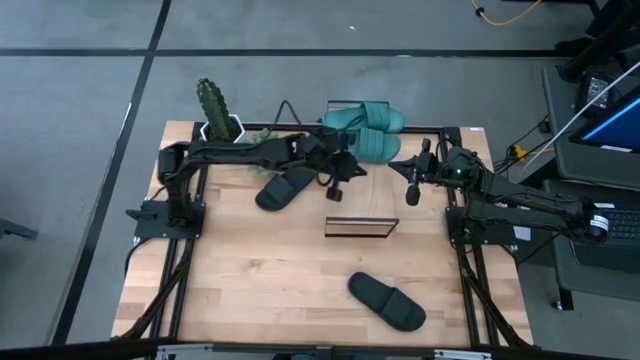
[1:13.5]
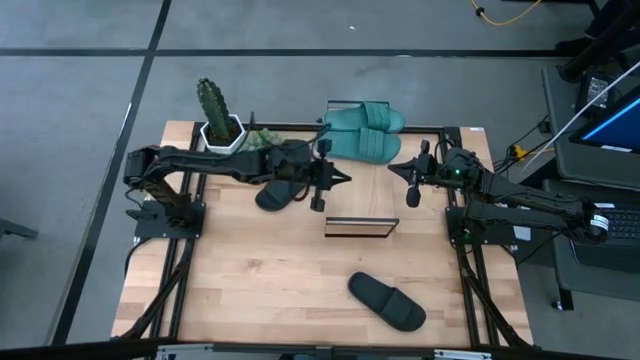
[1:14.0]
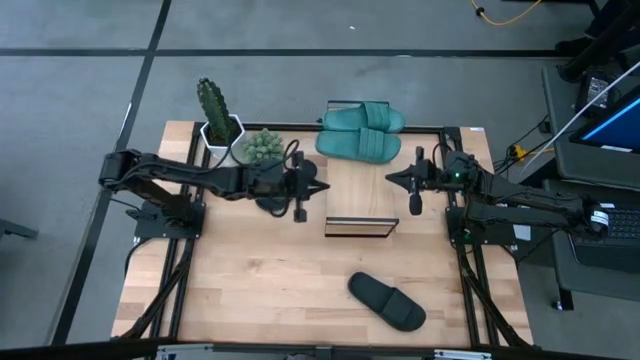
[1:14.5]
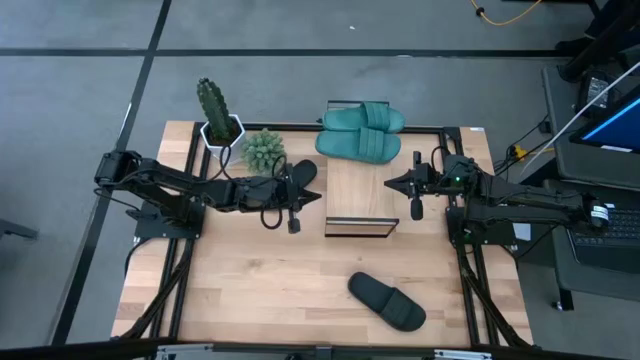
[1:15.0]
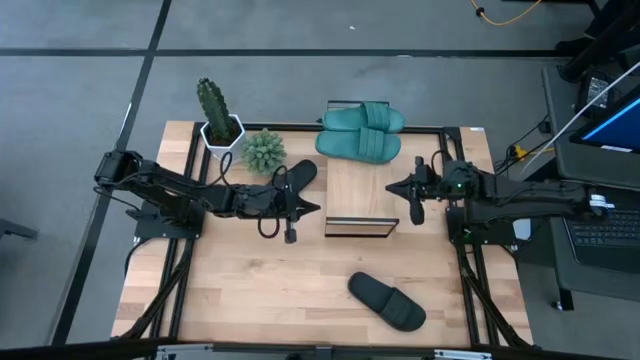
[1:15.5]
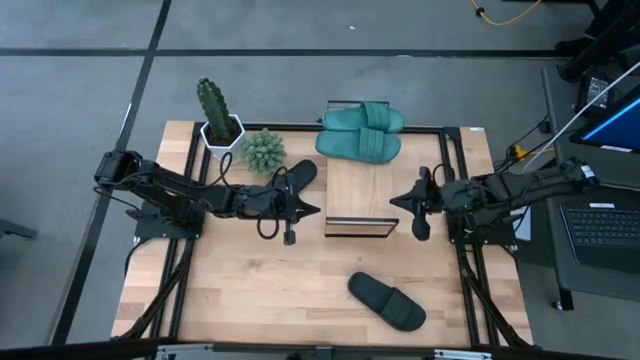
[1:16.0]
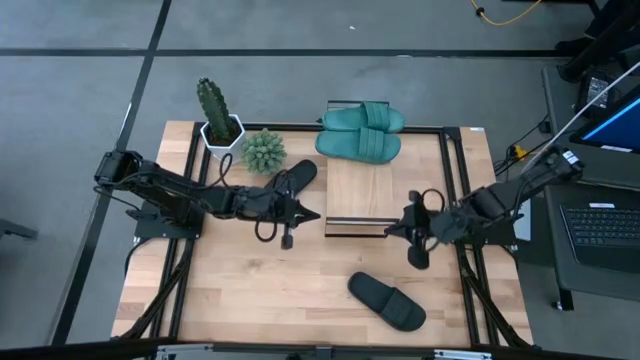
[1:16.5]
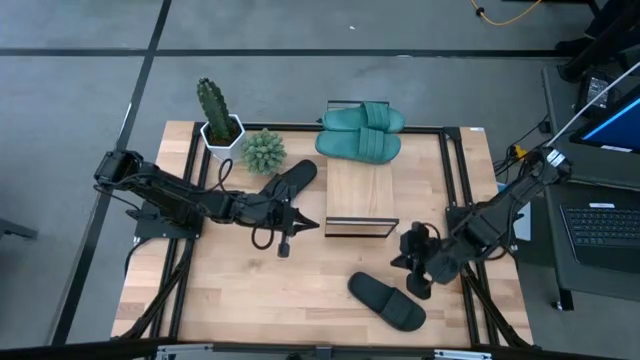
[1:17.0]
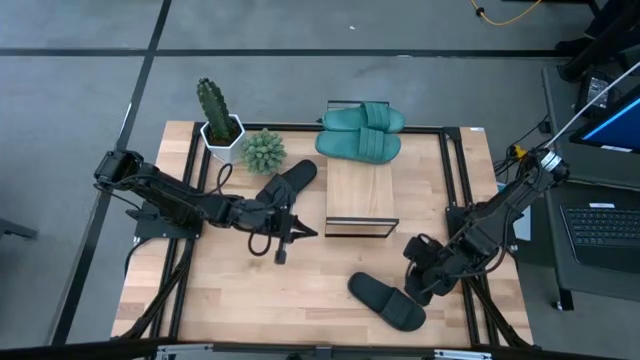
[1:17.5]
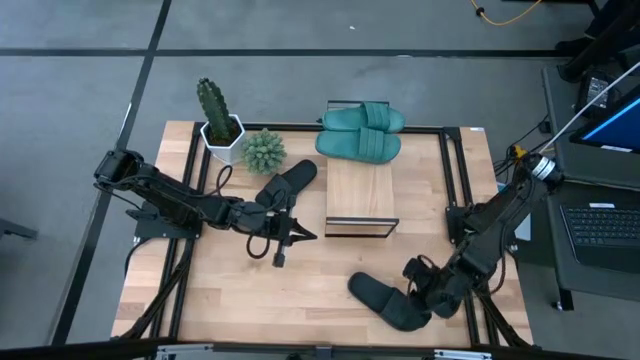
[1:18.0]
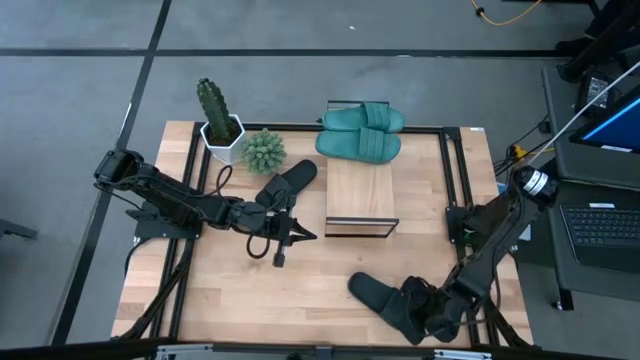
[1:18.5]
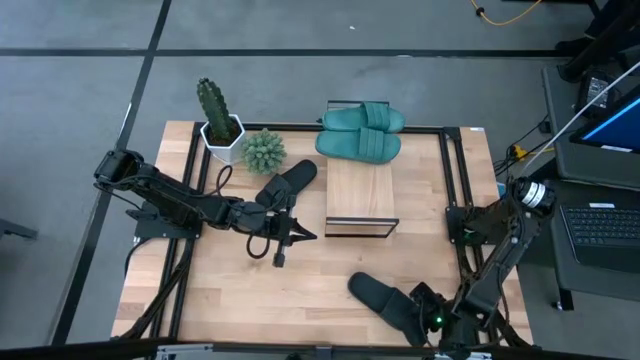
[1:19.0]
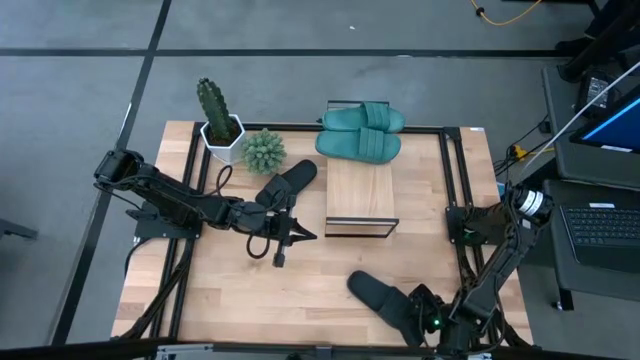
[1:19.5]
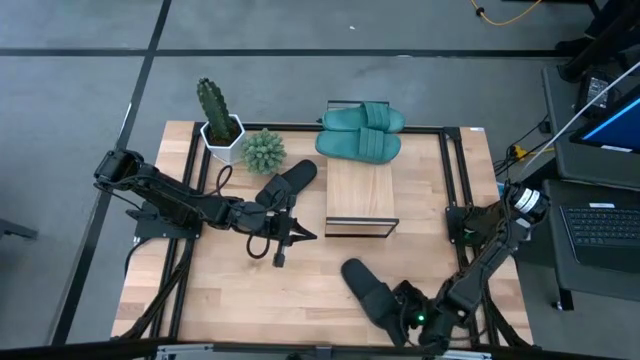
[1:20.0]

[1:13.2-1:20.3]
Task: Pick and place slides into the shelf
Put the bottom black slide on the shelf

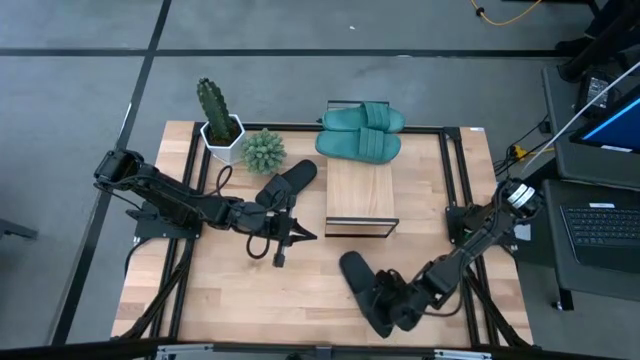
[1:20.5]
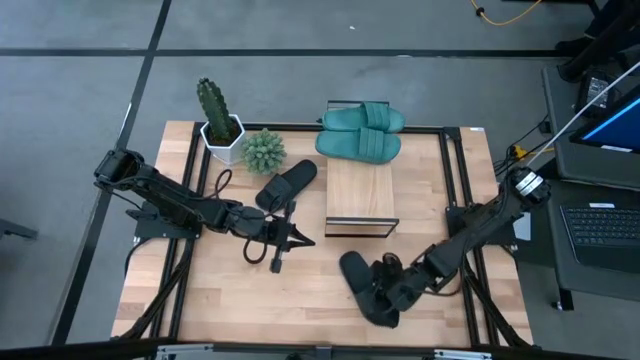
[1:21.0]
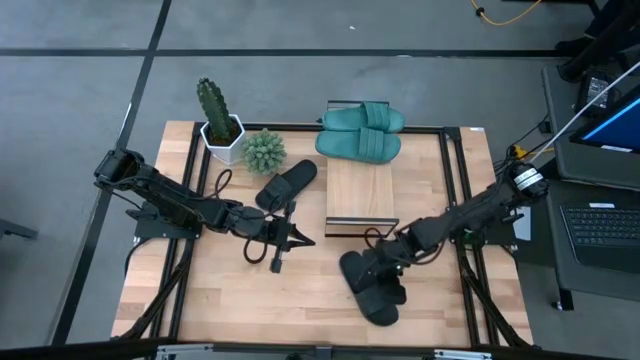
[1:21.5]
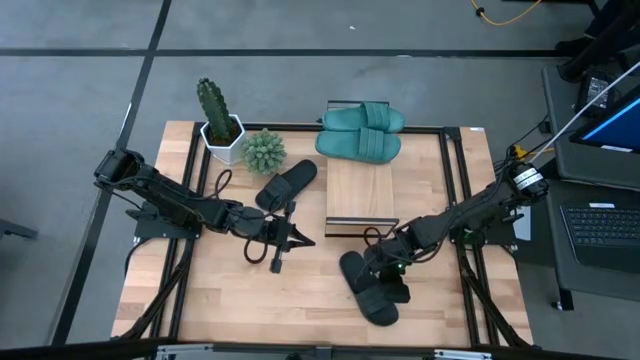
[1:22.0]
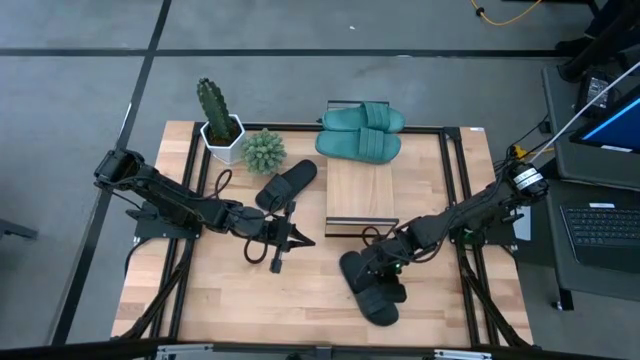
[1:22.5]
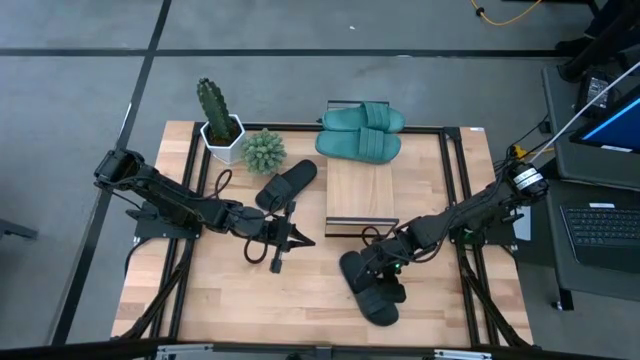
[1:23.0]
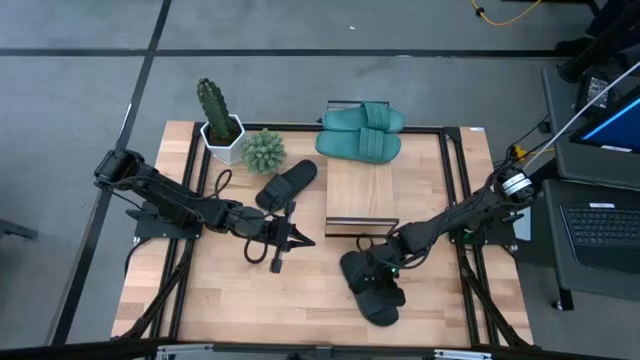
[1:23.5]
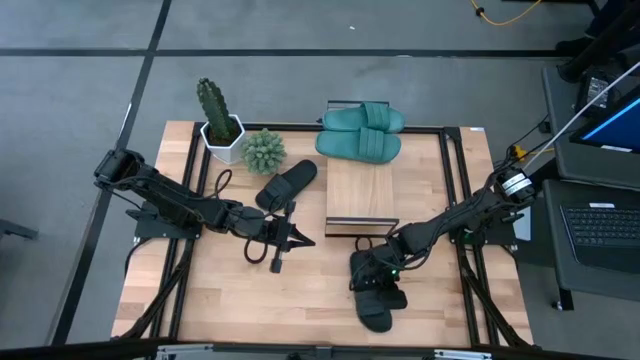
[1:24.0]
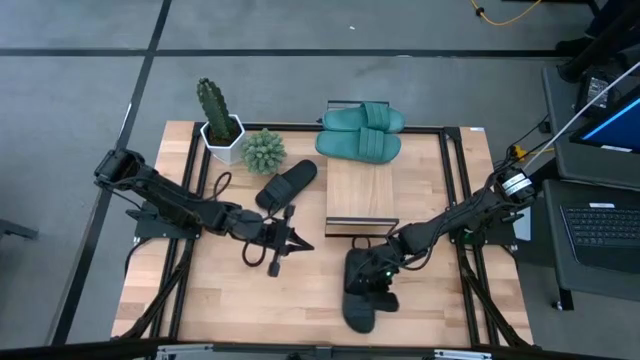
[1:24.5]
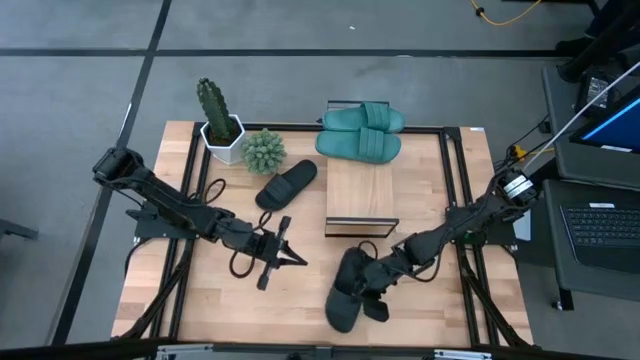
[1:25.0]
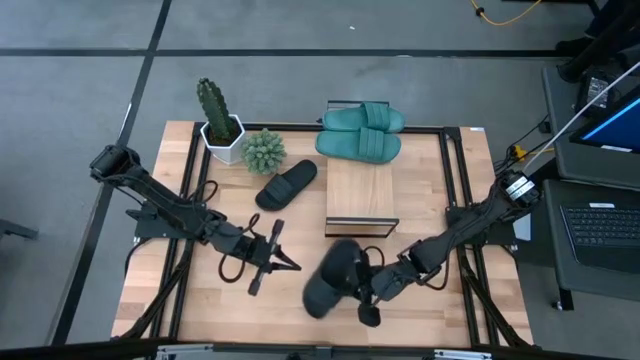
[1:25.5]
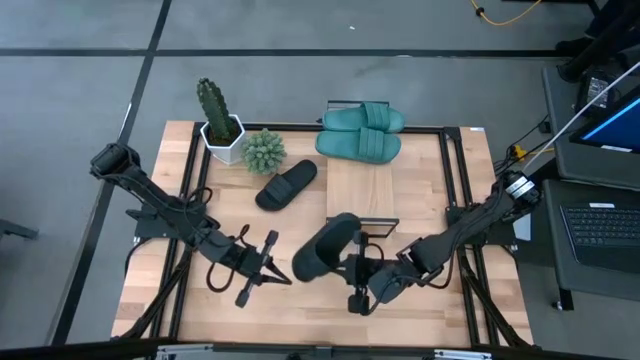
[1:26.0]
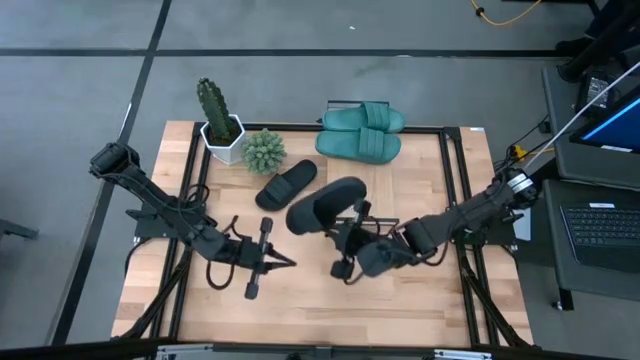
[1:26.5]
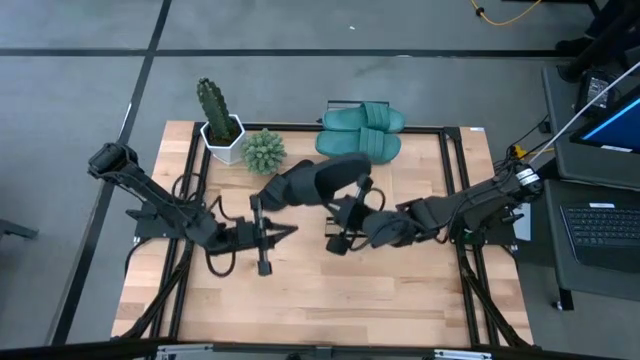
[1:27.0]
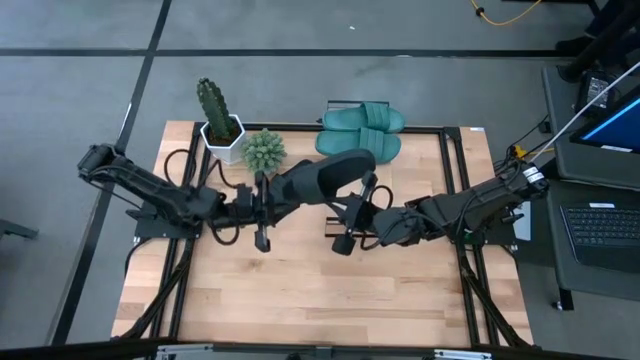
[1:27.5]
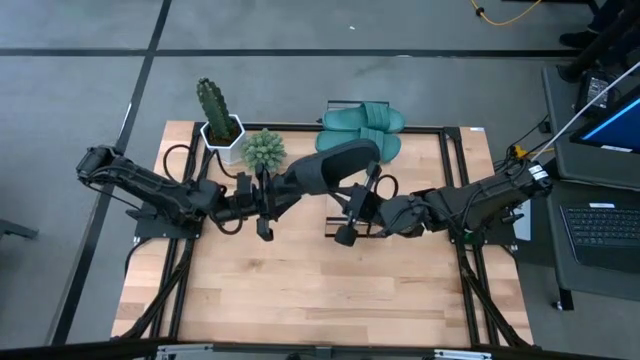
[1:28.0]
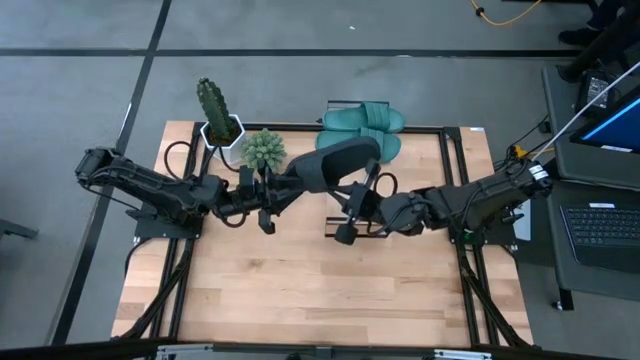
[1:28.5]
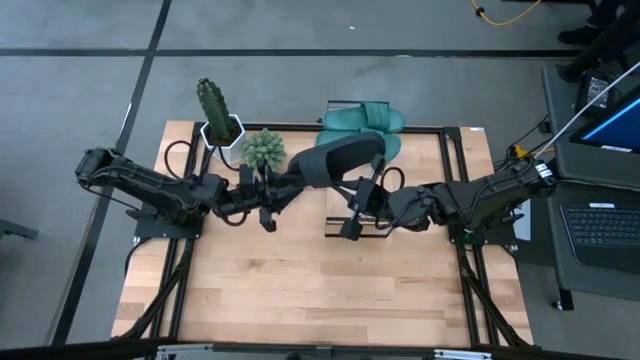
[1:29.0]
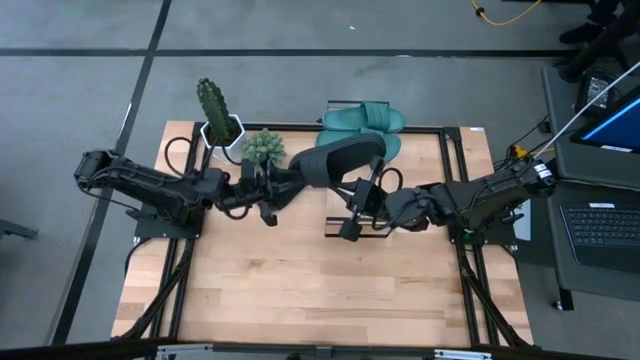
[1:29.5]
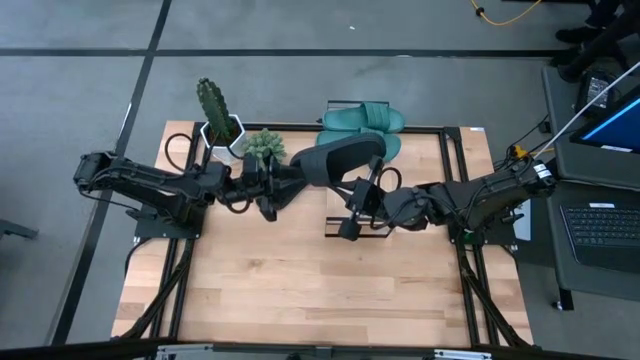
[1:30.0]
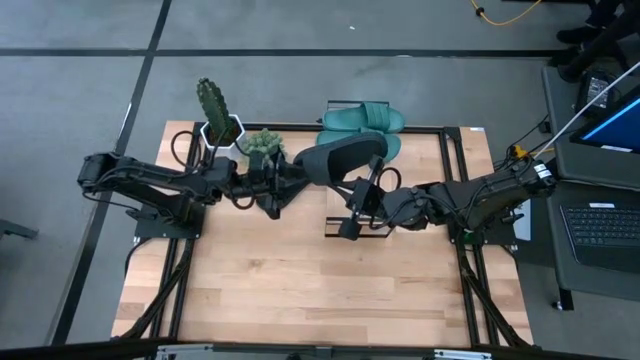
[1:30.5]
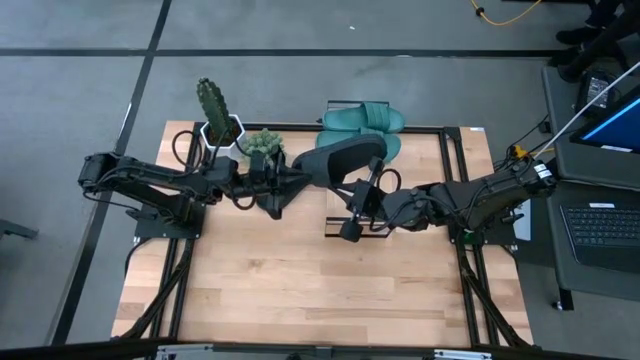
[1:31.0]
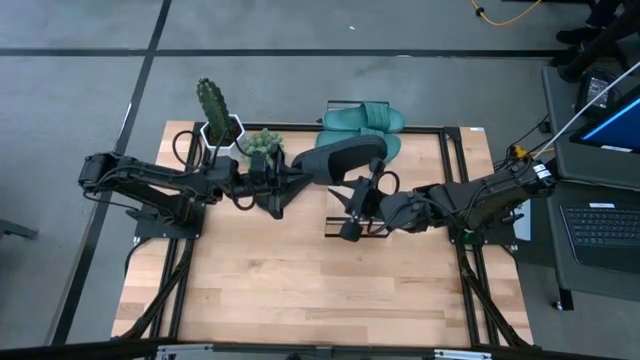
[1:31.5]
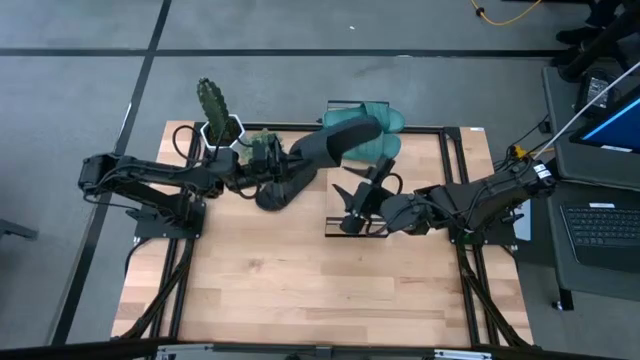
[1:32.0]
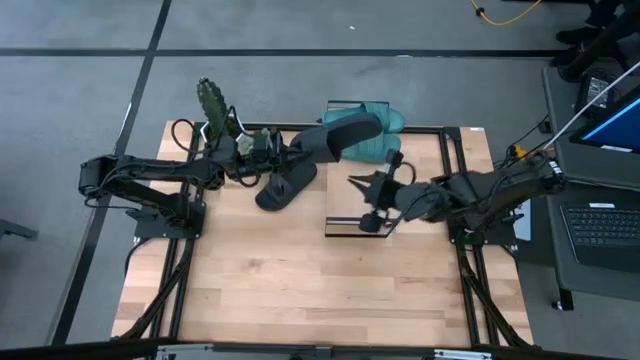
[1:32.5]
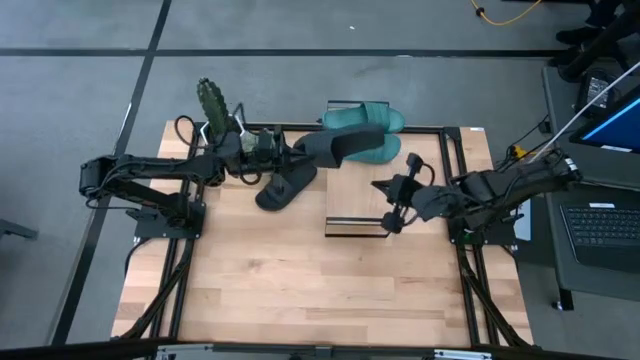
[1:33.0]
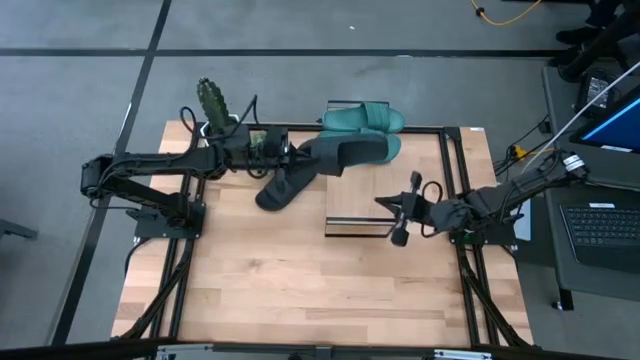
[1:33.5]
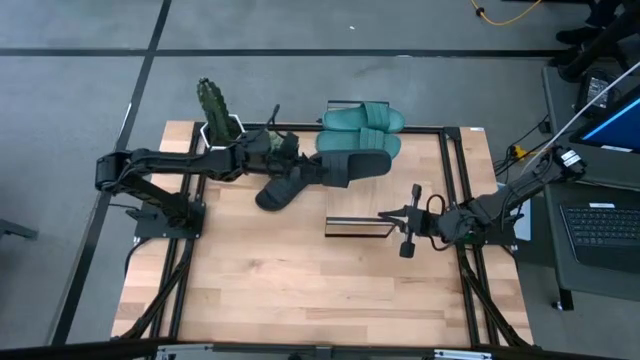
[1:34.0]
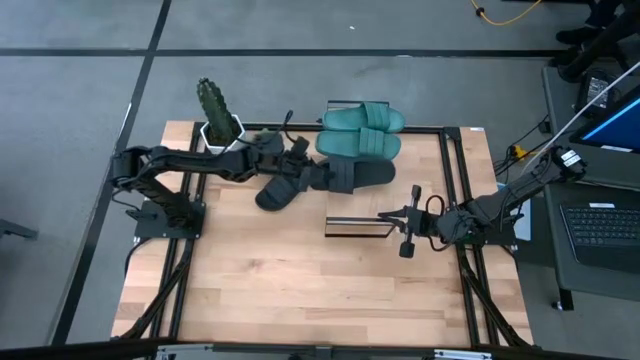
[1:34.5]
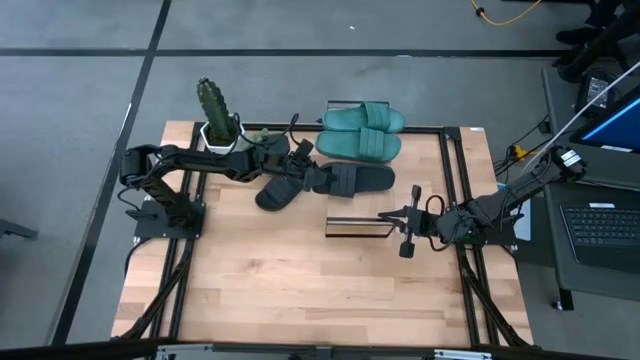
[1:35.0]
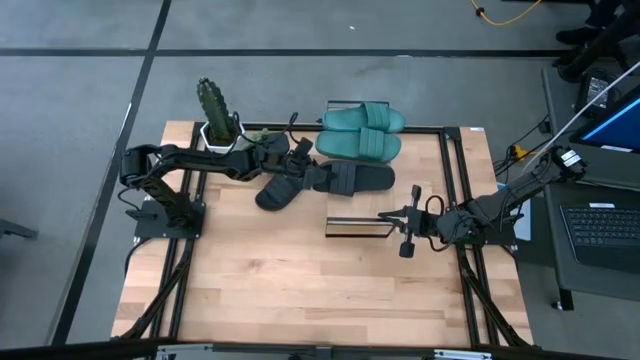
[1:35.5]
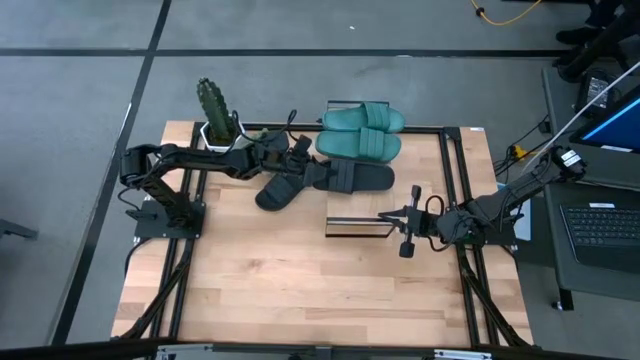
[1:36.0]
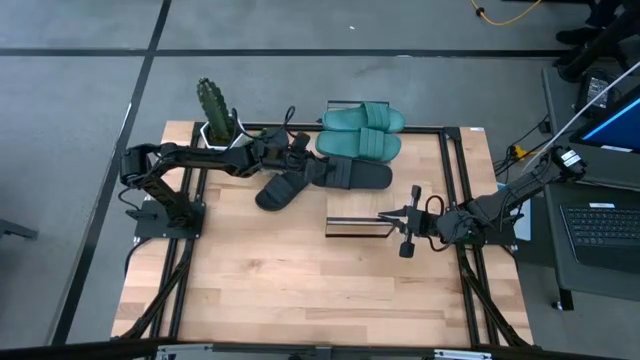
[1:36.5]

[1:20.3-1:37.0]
Put the bottom black slide on the shelf
